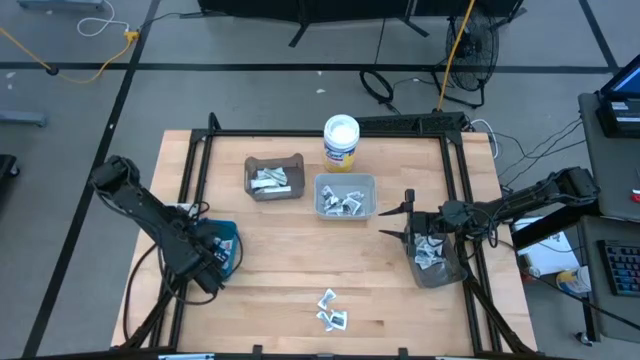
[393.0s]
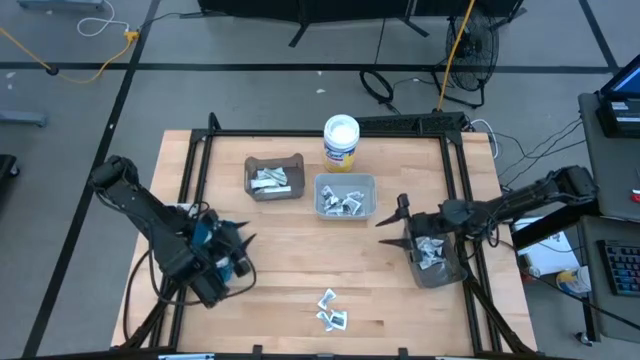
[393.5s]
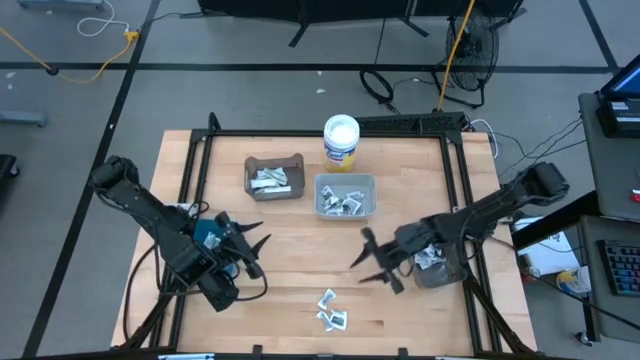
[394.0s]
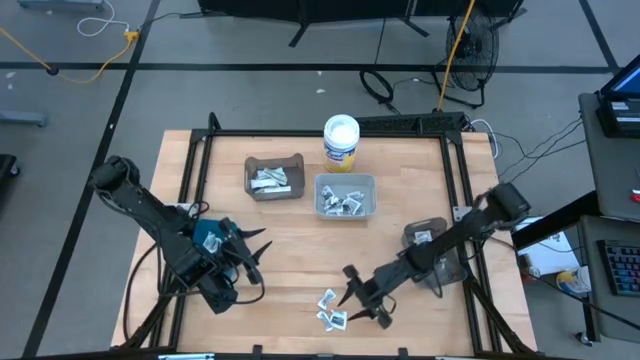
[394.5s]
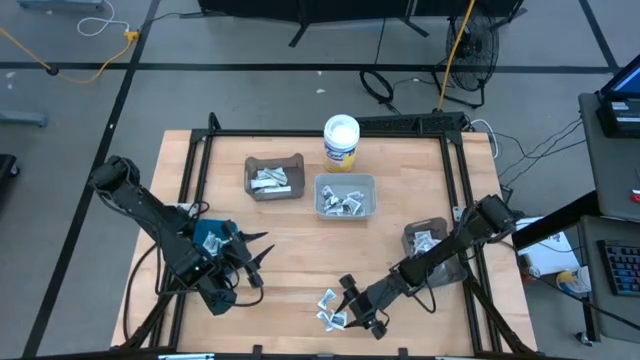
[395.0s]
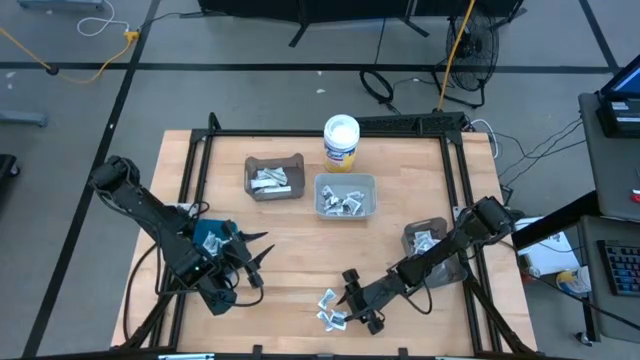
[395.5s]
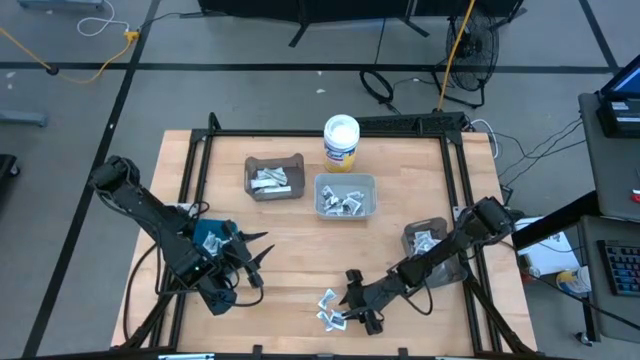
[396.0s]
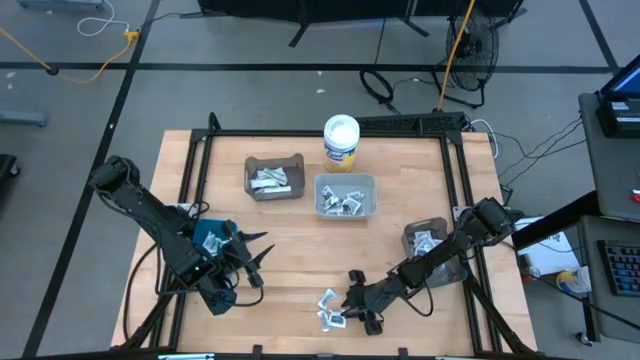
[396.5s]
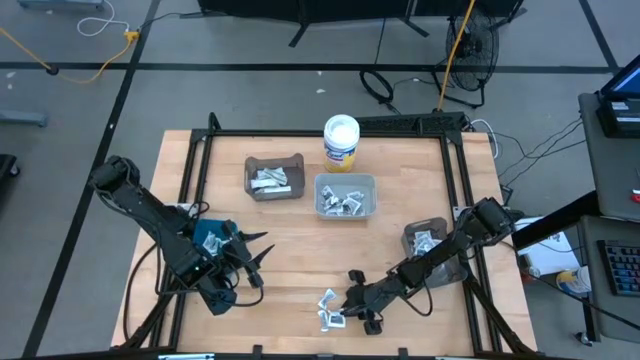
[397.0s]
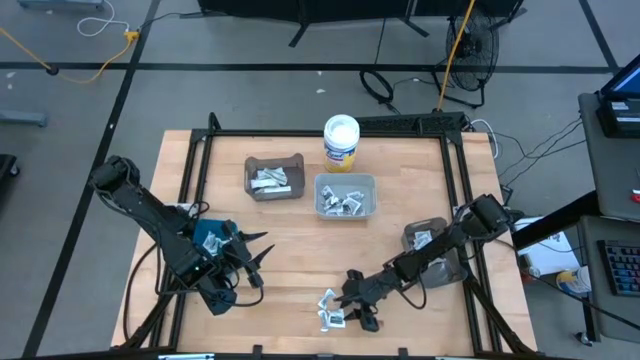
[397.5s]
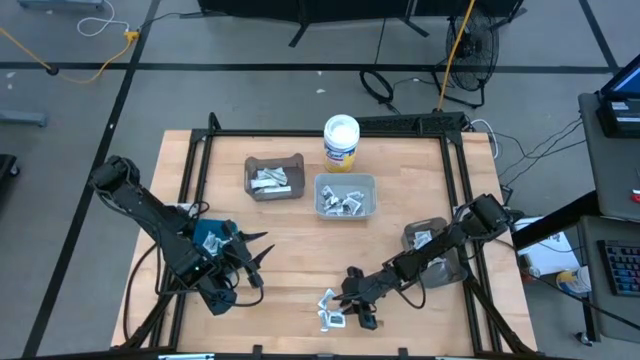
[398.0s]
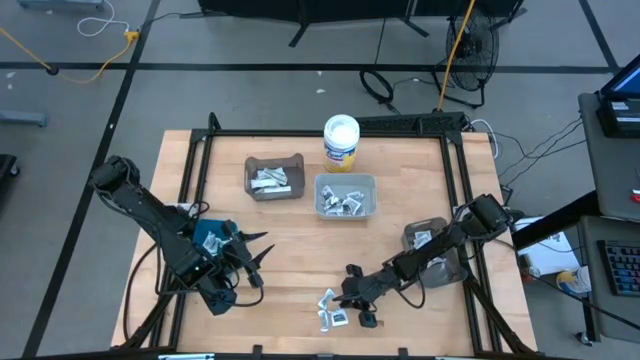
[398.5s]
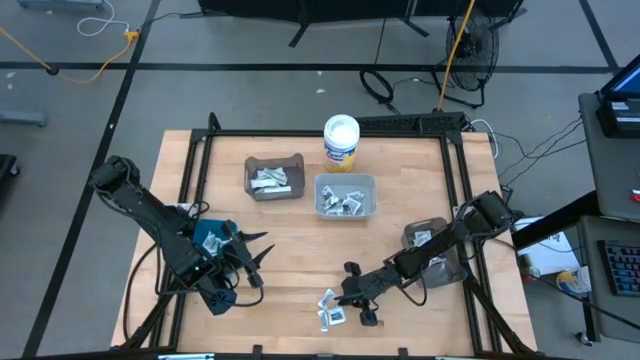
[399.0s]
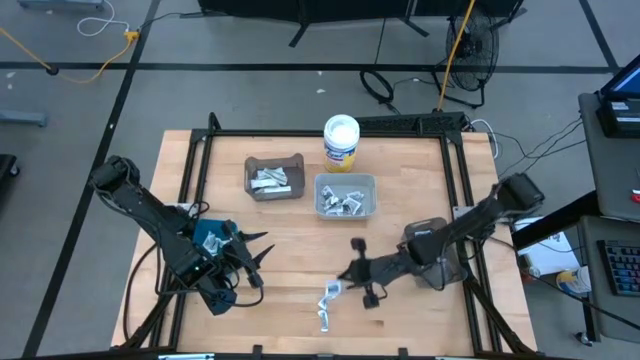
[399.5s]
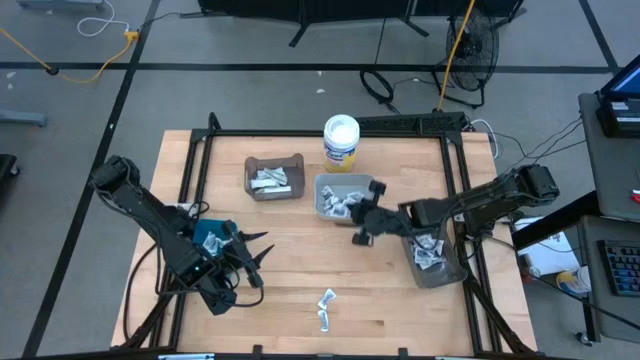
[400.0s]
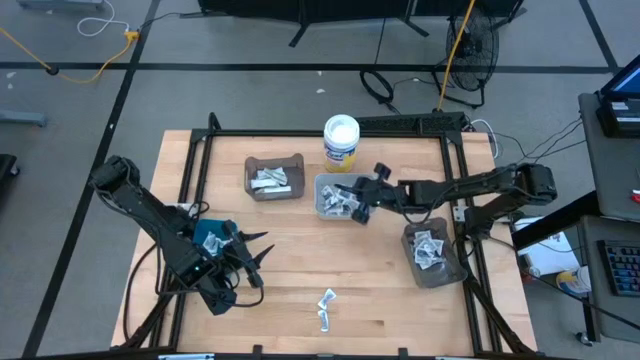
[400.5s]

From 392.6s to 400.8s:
Task: Pick & Place First Aid Supplies
Put the gray towelette pack into the gray bin

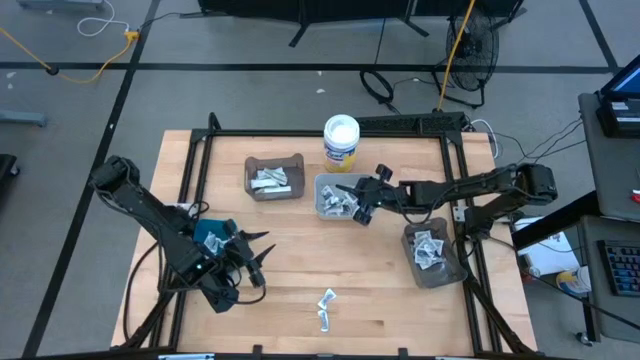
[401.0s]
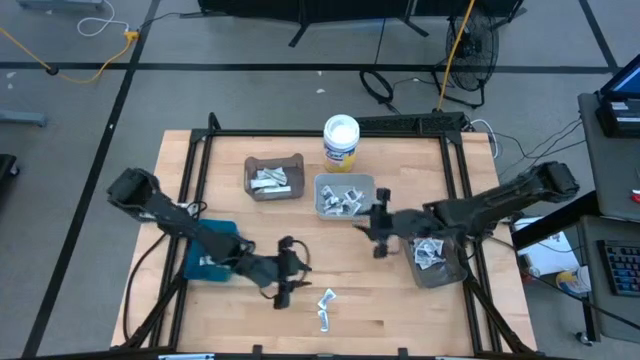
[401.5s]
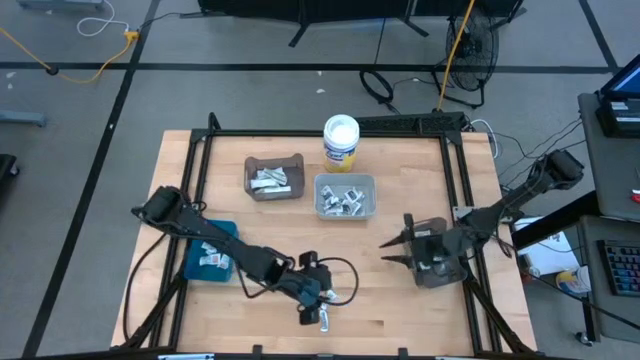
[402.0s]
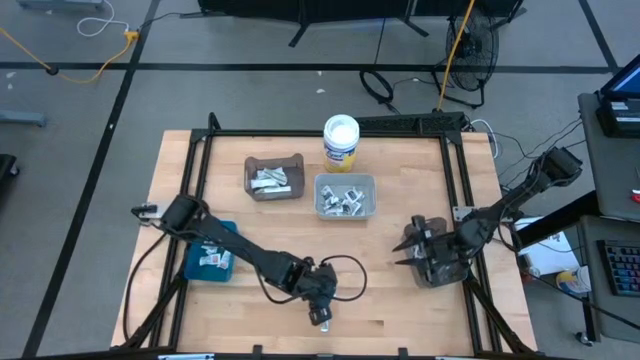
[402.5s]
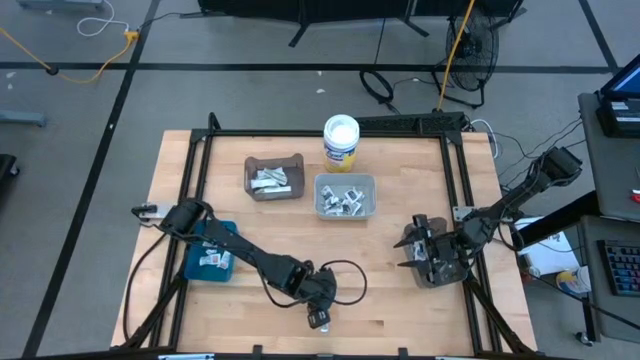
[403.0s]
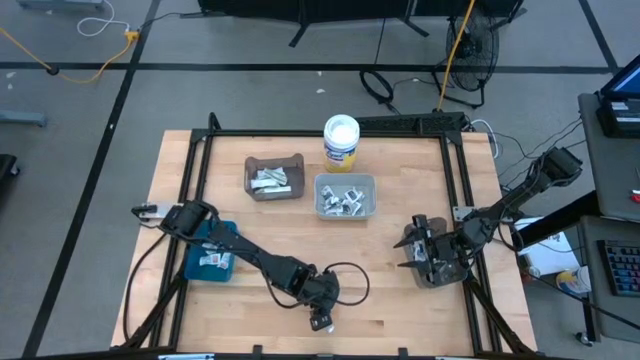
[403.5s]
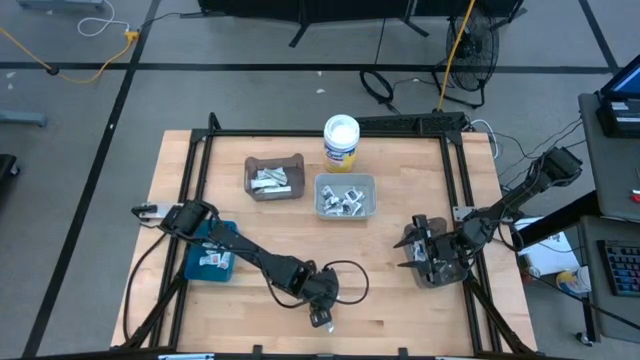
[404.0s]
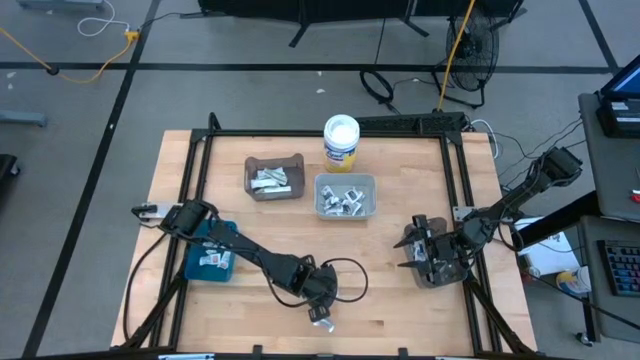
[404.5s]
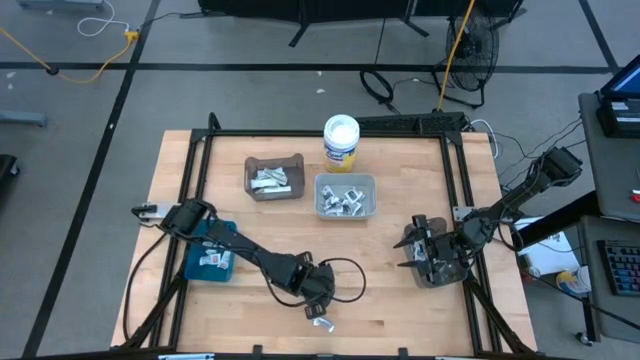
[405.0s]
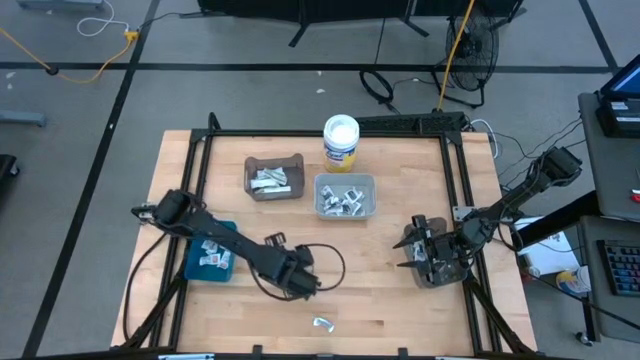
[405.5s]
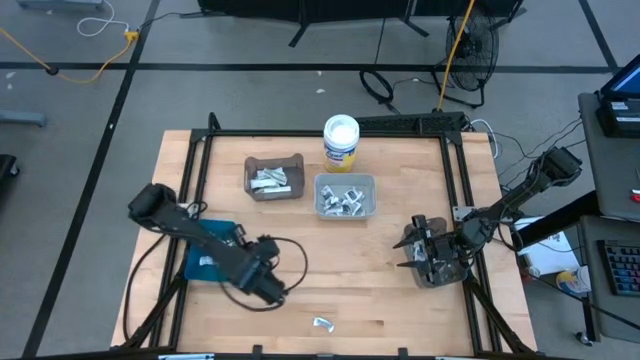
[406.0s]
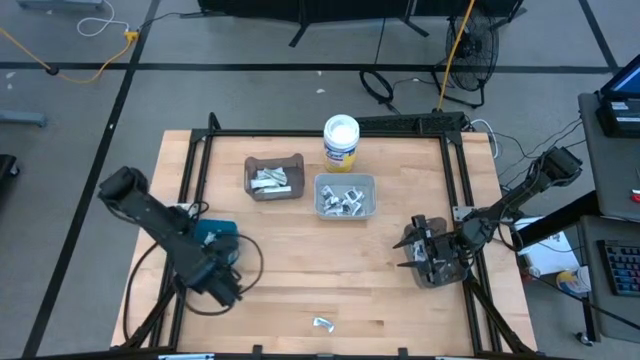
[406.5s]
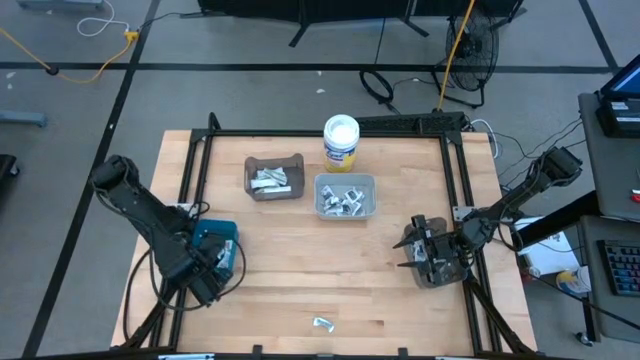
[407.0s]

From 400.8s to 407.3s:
Put the orange ointment pack into the blue bin

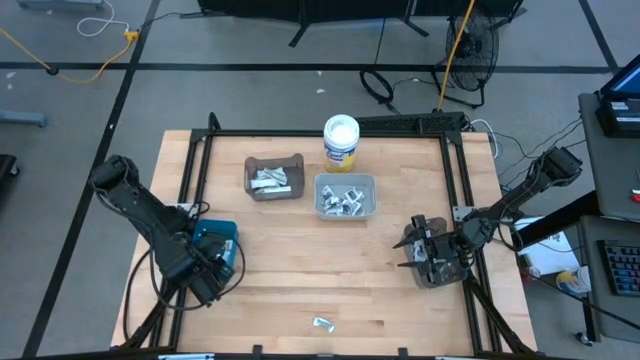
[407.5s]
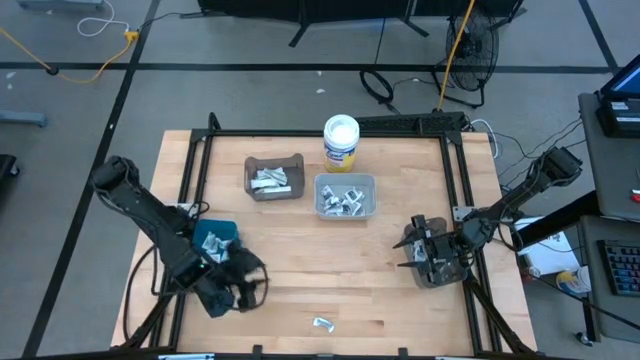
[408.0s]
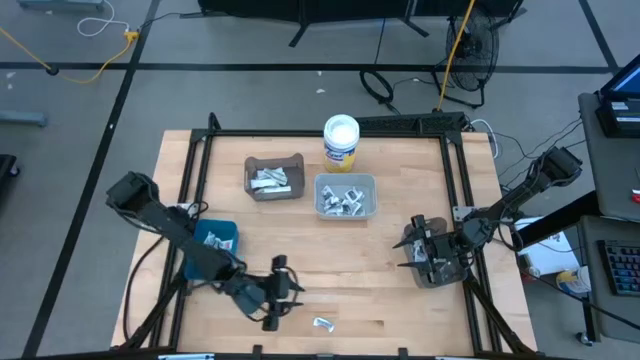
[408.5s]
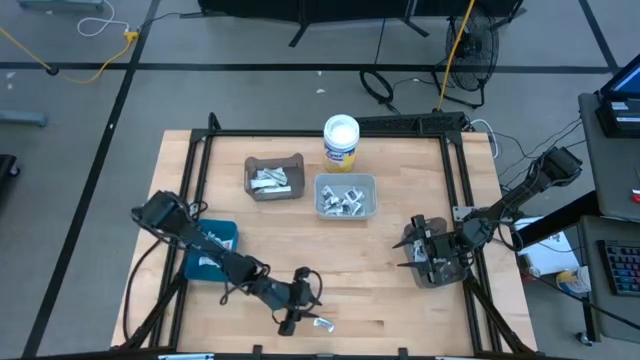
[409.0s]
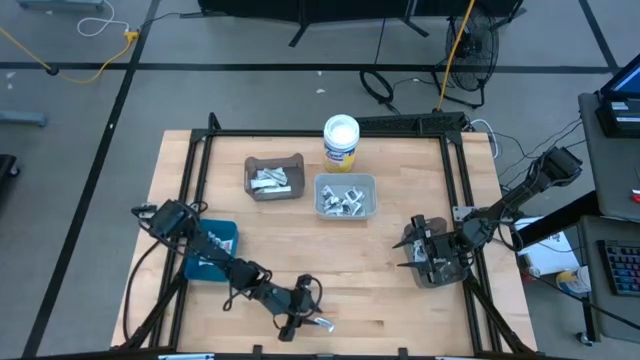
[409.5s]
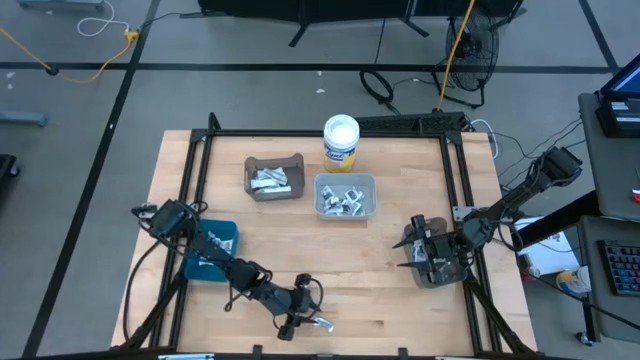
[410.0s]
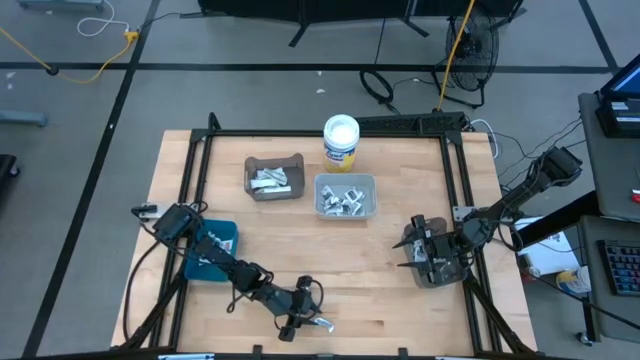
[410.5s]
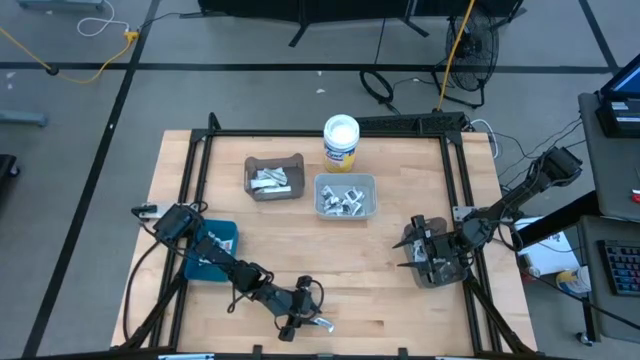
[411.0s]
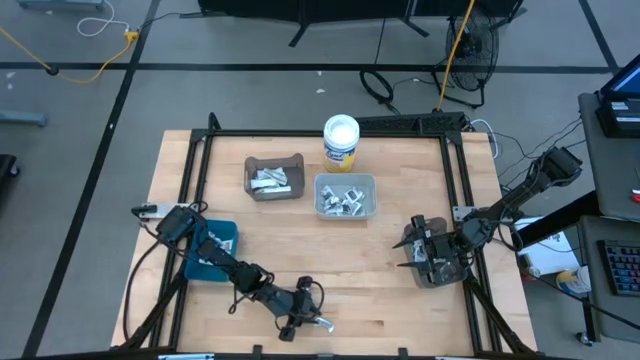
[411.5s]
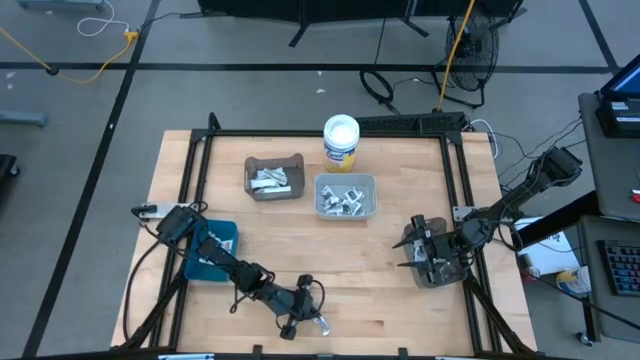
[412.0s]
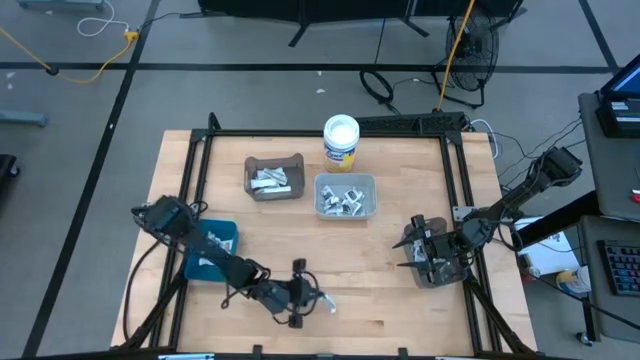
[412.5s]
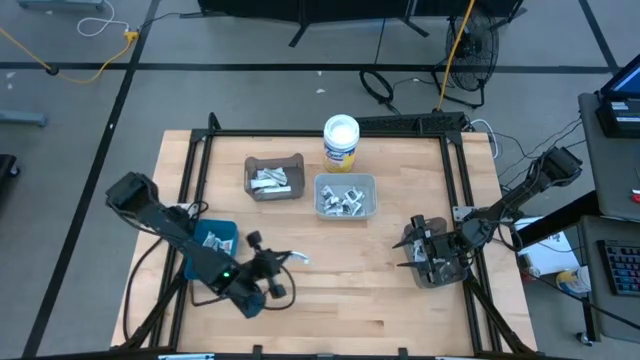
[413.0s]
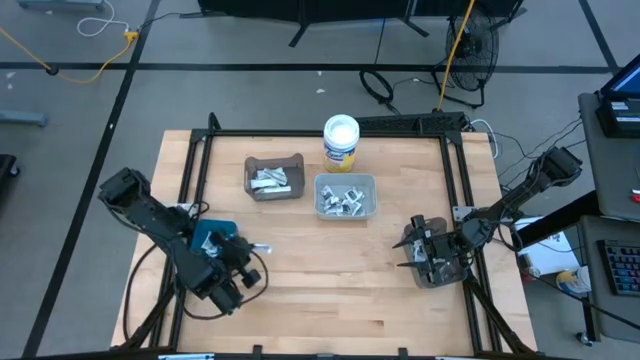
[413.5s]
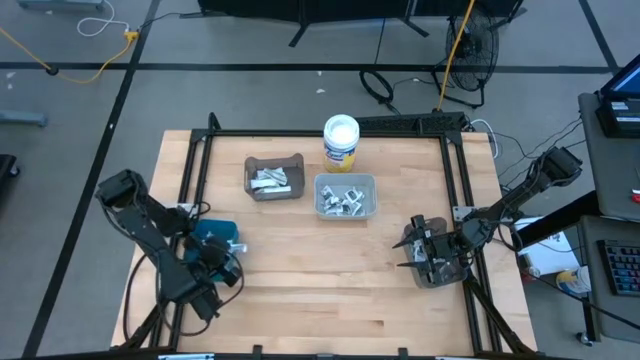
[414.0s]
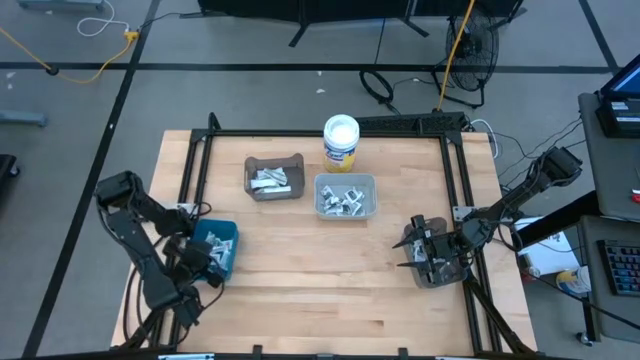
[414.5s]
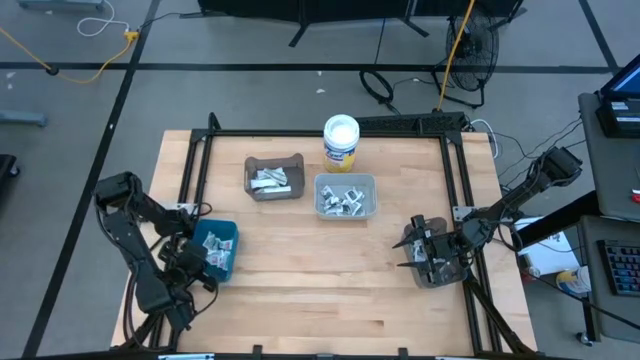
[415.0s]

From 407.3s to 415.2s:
Put the orange ointment pack into the blue bin
